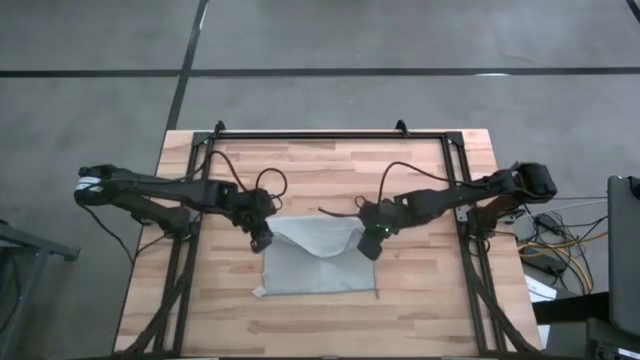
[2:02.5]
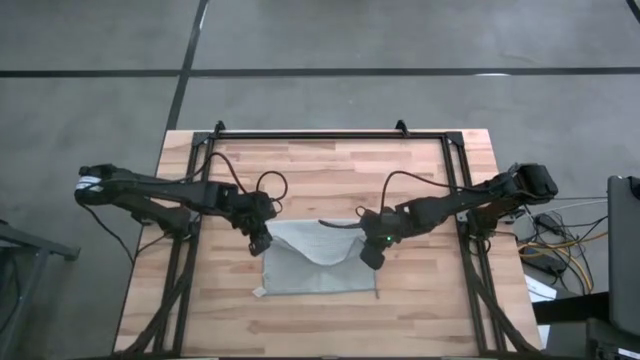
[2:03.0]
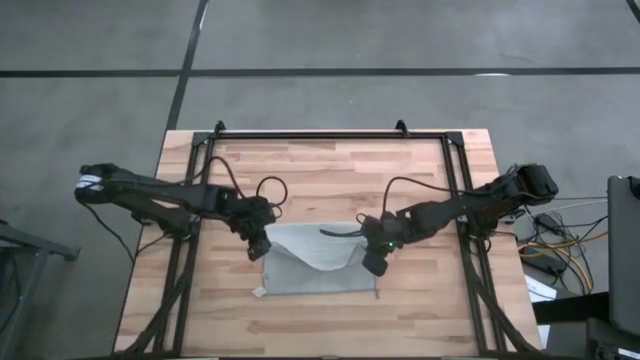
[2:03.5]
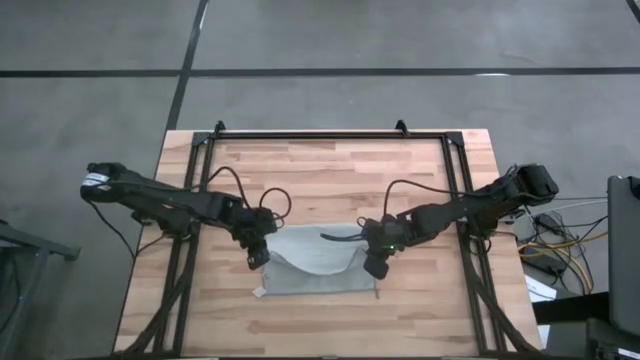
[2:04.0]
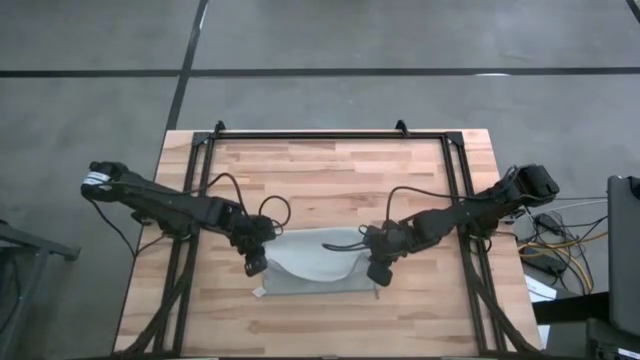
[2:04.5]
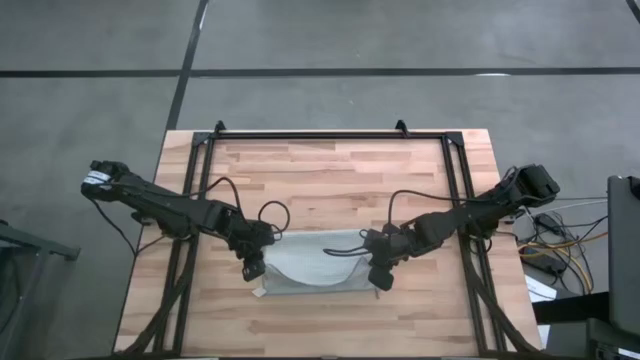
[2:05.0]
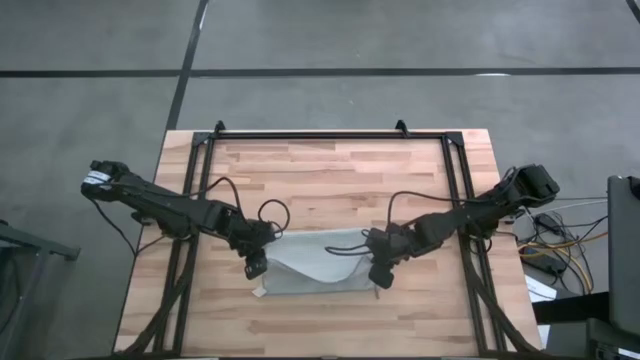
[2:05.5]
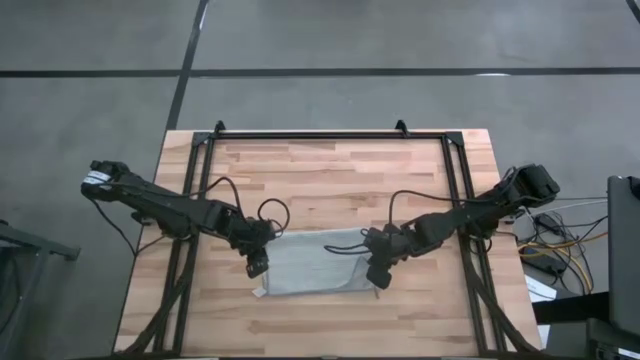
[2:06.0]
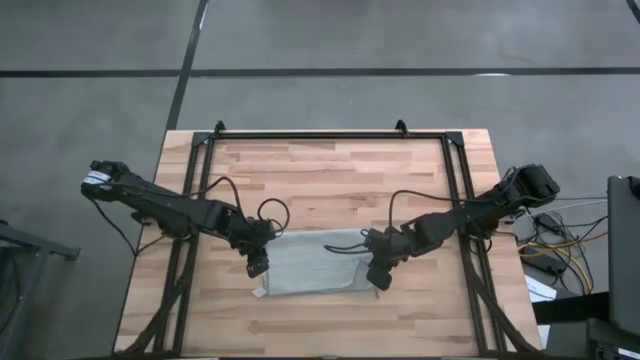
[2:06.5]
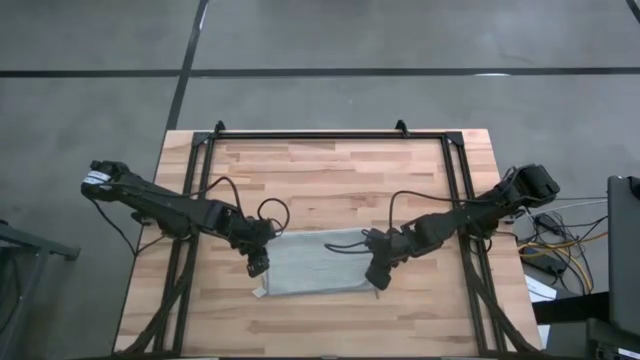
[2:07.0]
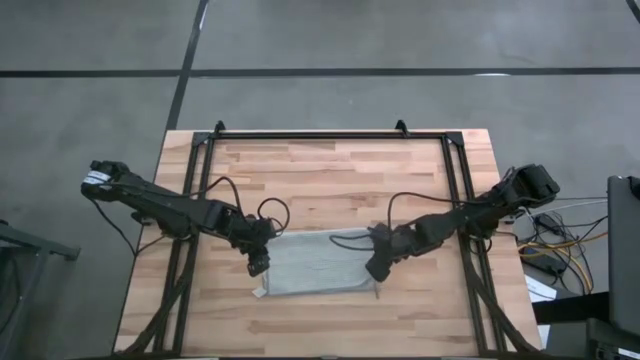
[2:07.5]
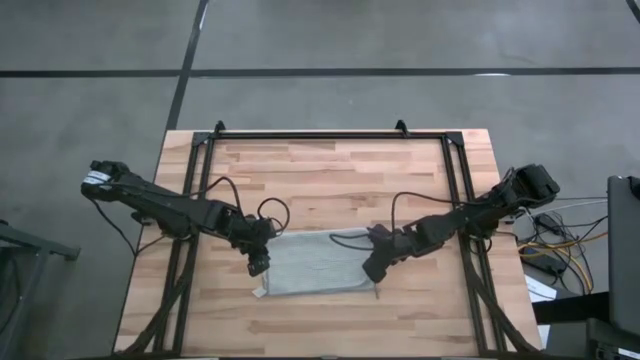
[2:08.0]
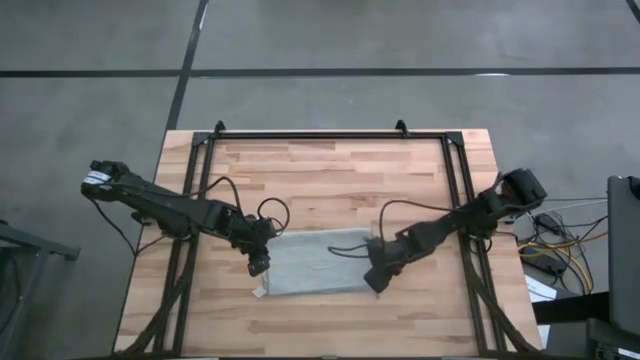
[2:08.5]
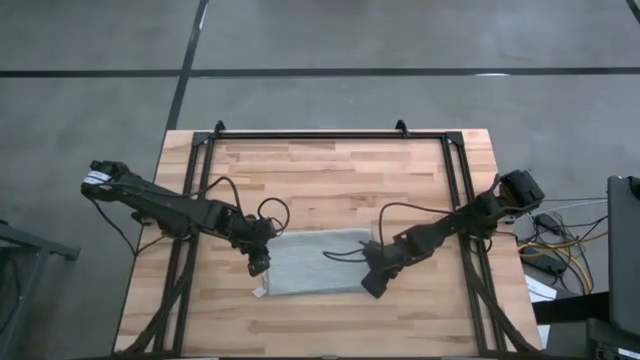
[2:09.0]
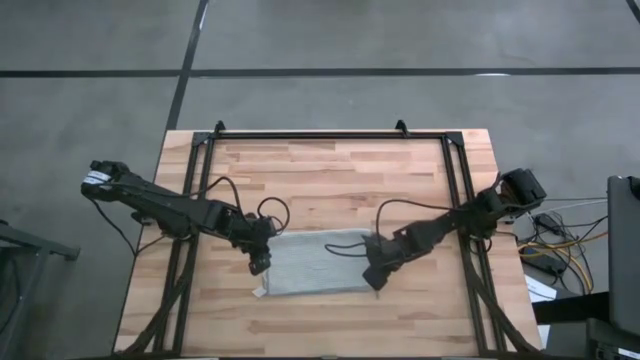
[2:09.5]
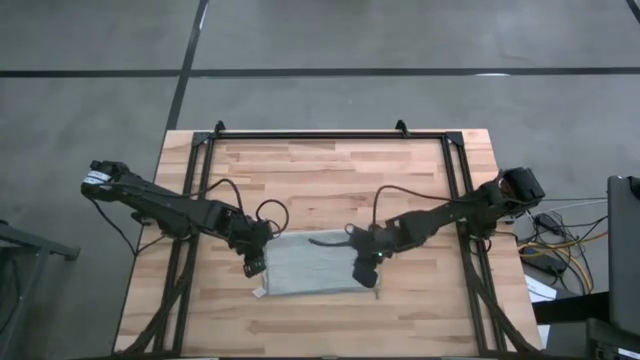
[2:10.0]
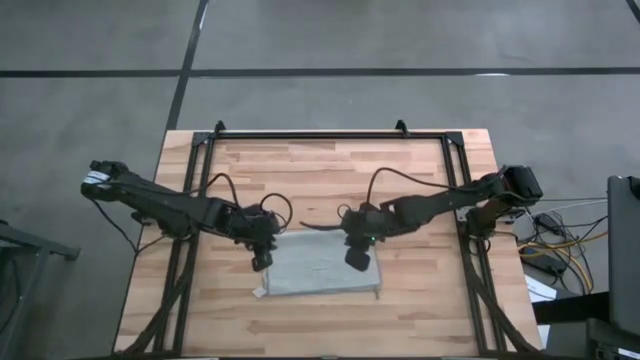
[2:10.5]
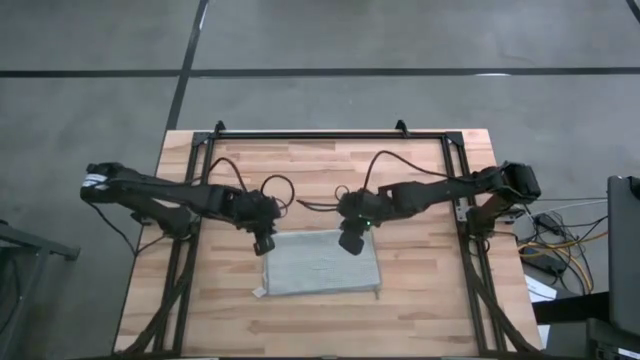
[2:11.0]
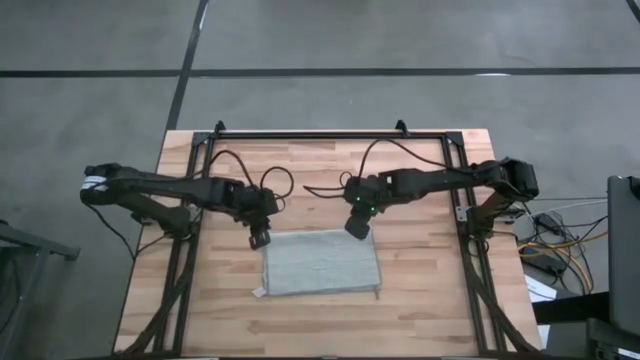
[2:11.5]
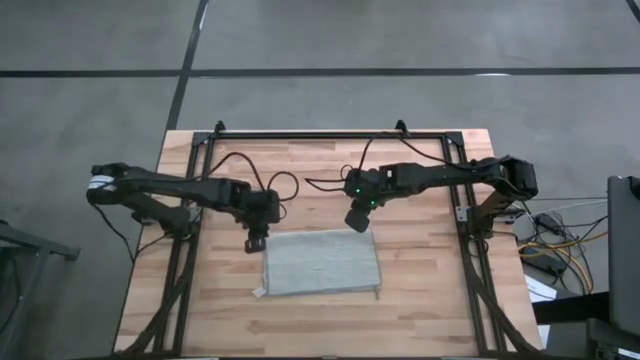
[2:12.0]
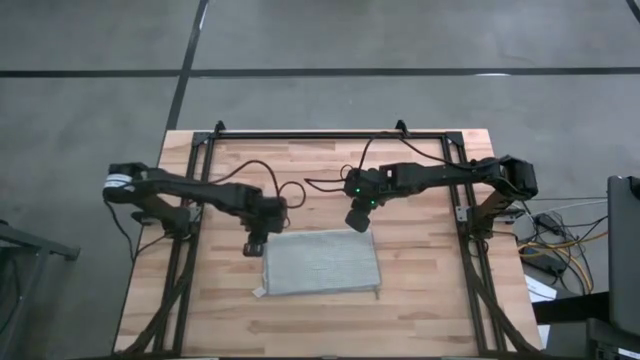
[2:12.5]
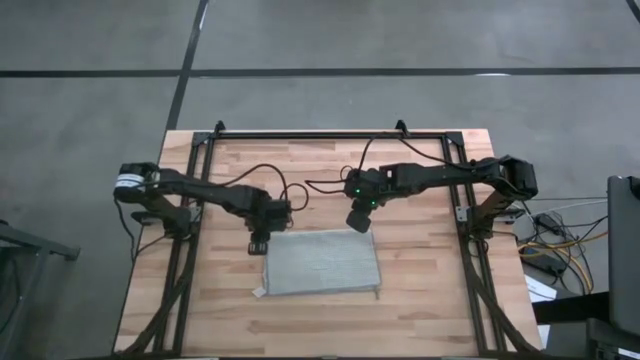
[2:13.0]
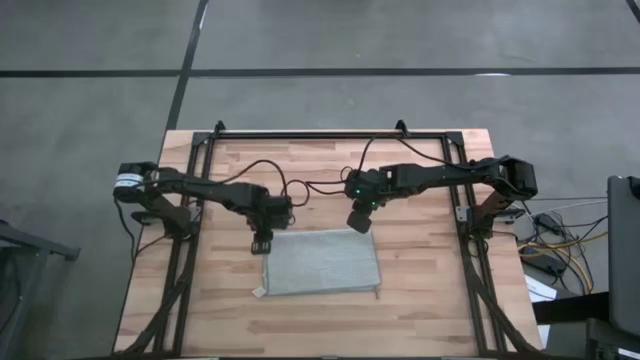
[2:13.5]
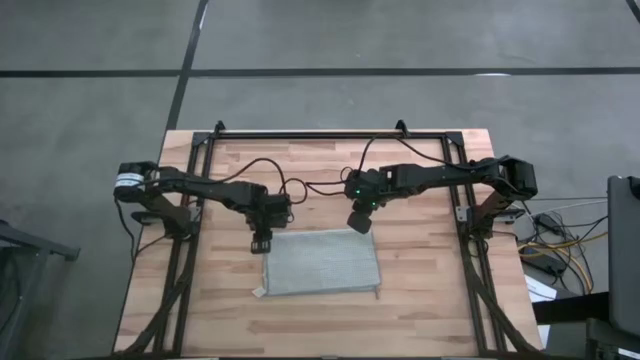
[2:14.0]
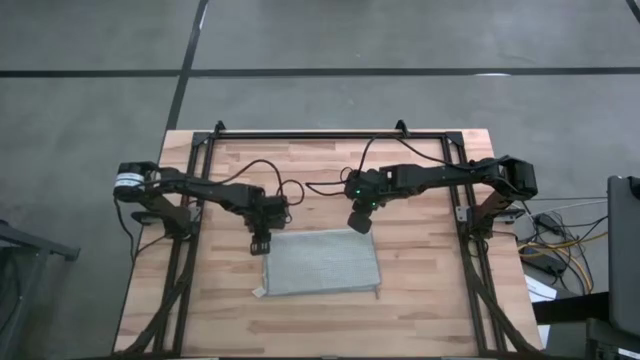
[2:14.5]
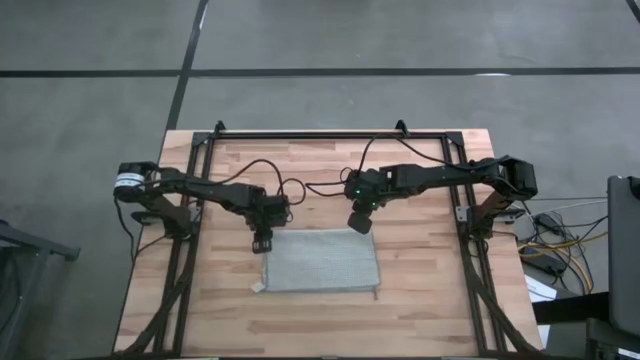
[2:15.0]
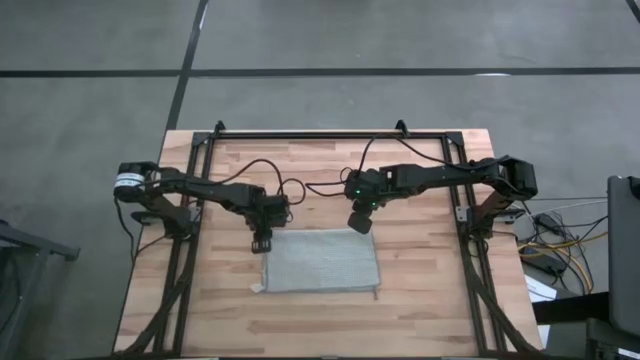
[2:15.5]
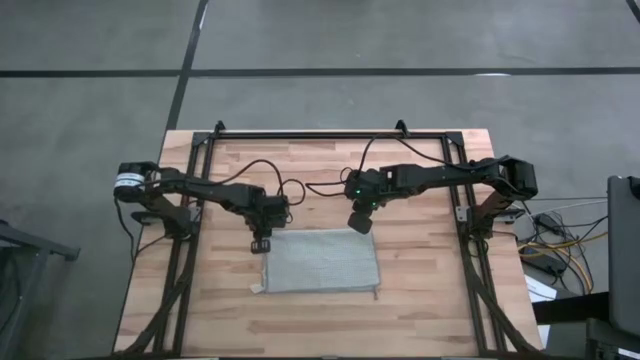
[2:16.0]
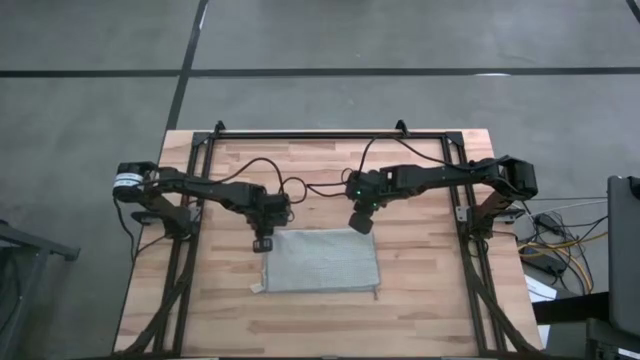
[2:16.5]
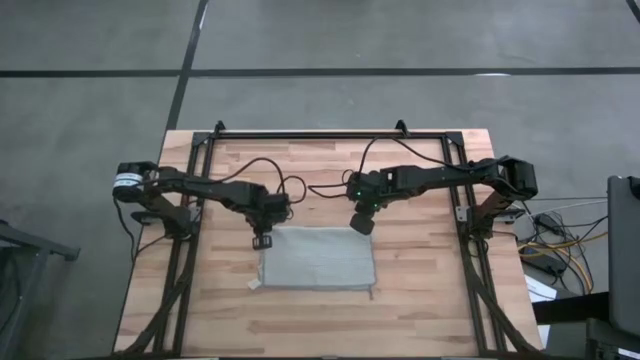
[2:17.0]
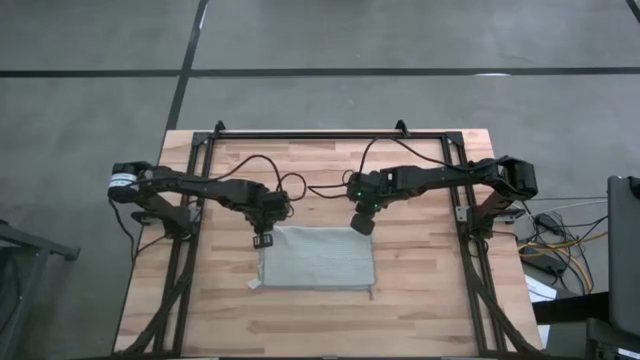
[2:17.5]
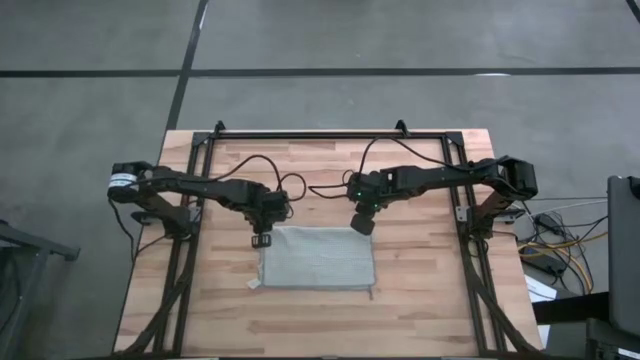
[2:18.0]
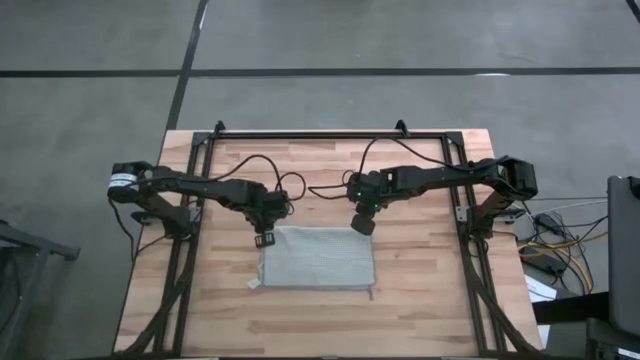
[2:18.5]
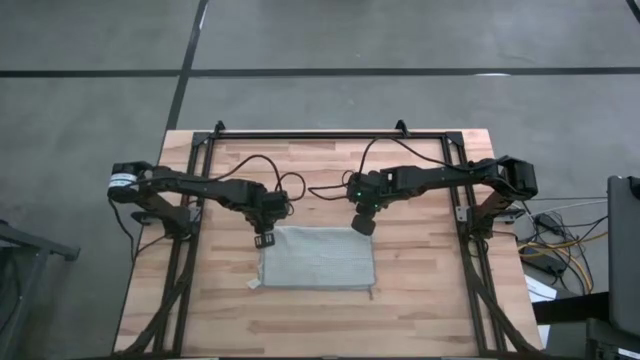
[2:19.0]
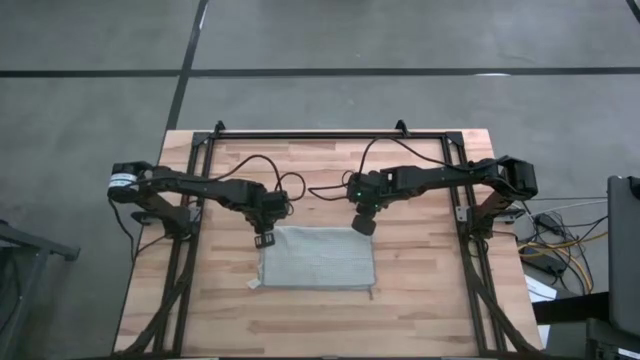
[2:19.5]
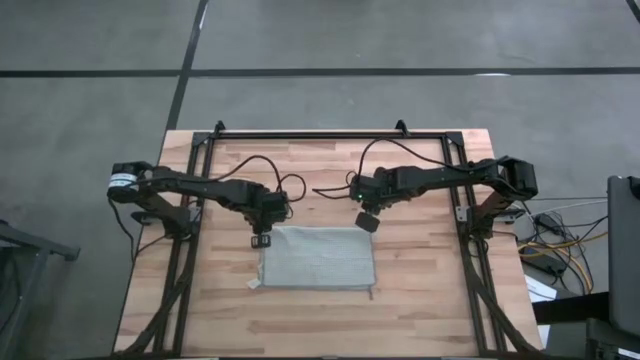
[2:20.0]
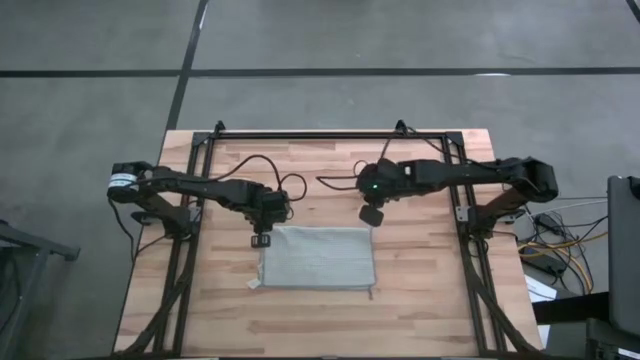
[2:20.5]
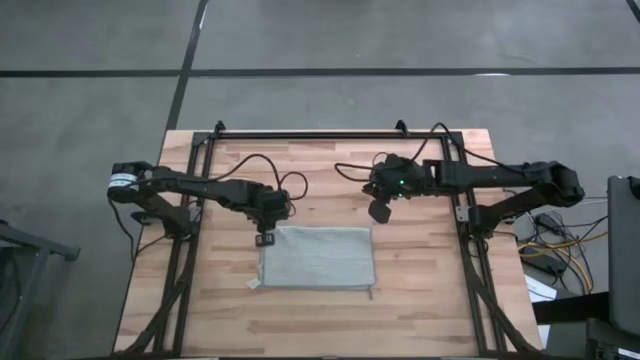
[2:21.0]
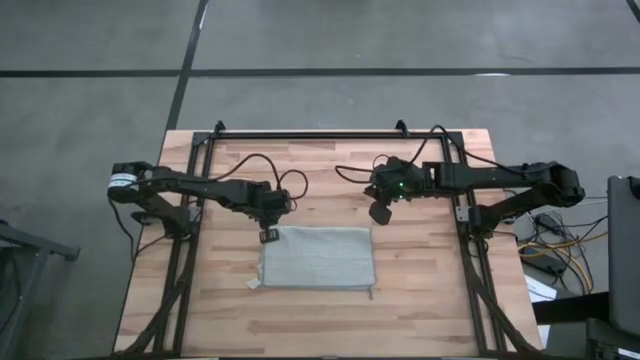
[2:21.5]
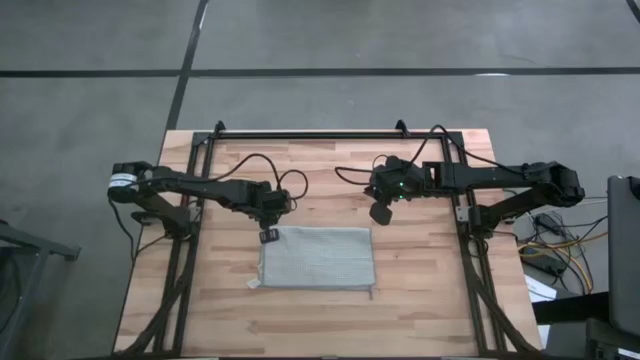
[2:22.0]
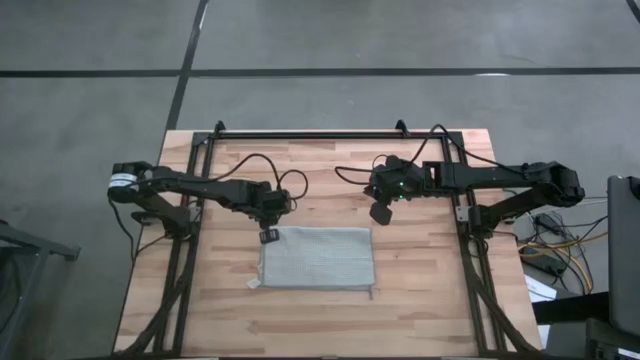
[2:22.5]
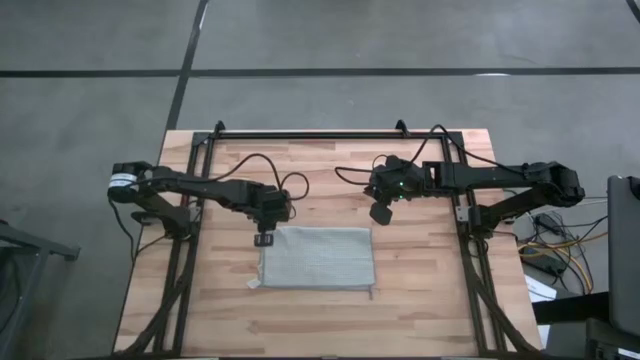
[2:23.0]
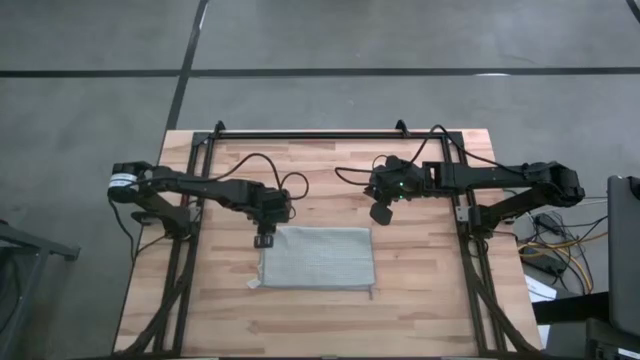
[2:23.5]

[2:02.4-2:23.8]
Task: Fold microfiber towels
Fold the microfiber cloth on the table
